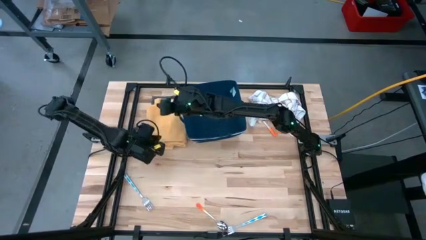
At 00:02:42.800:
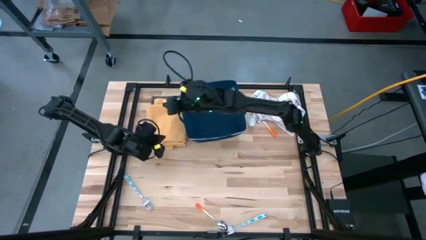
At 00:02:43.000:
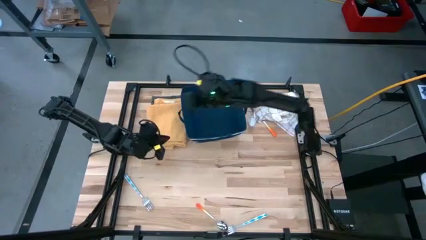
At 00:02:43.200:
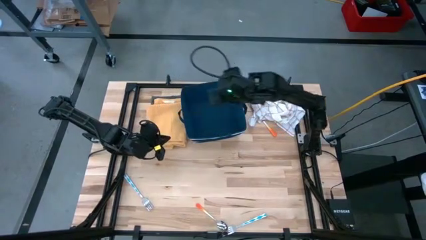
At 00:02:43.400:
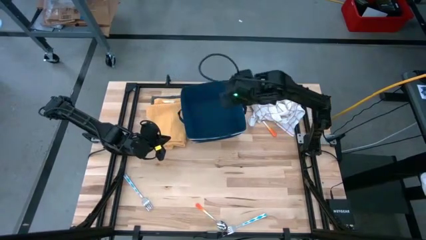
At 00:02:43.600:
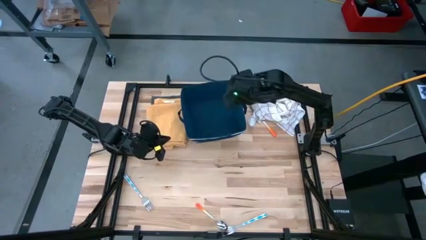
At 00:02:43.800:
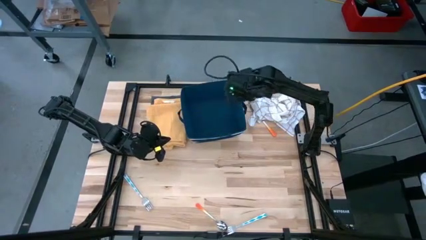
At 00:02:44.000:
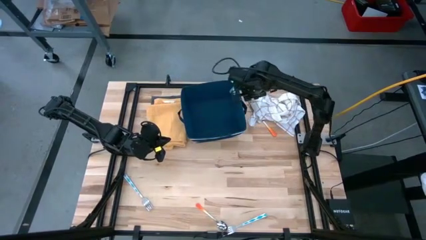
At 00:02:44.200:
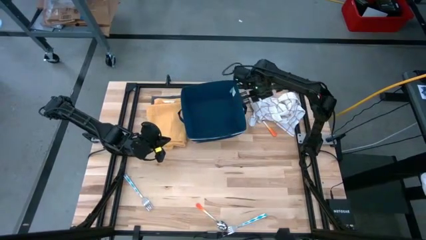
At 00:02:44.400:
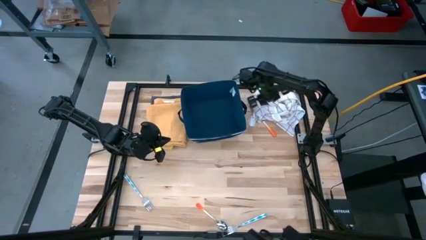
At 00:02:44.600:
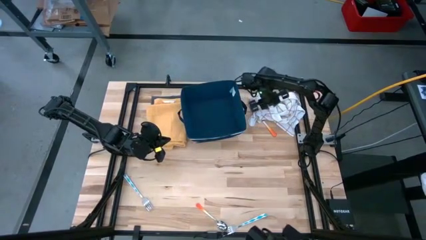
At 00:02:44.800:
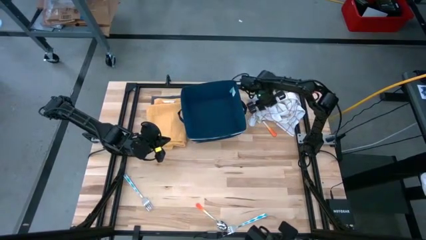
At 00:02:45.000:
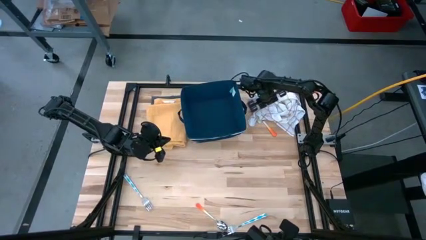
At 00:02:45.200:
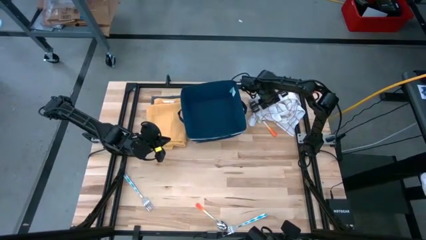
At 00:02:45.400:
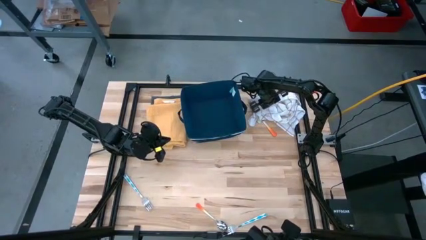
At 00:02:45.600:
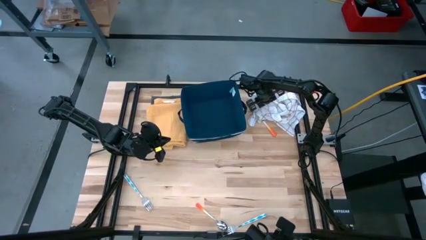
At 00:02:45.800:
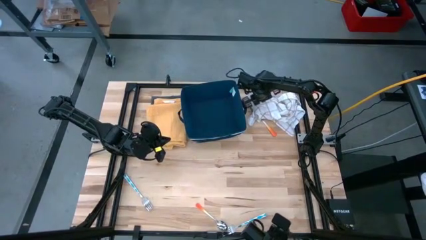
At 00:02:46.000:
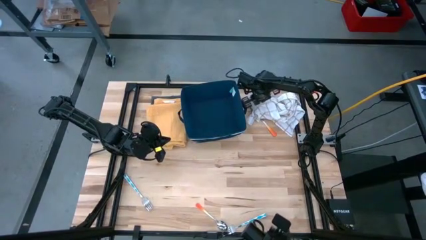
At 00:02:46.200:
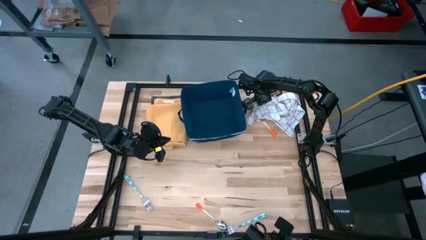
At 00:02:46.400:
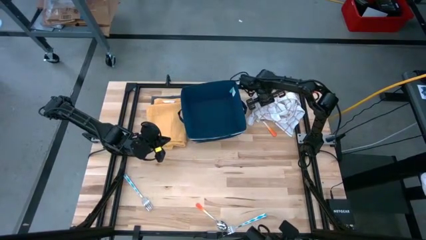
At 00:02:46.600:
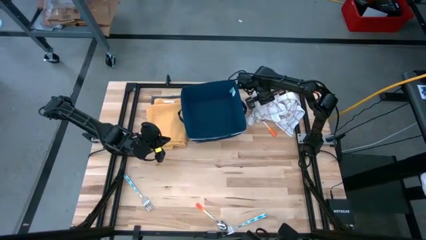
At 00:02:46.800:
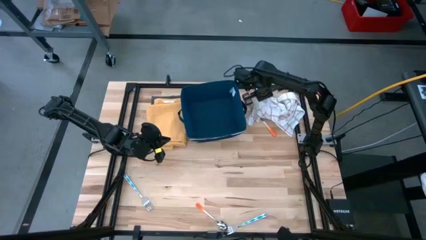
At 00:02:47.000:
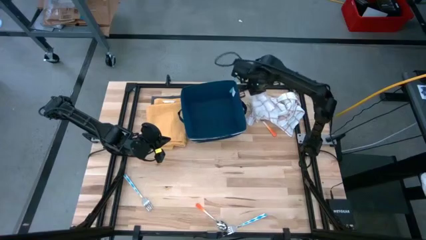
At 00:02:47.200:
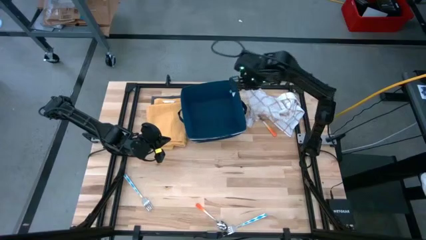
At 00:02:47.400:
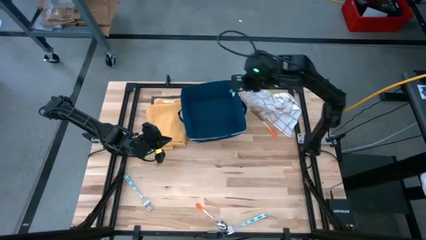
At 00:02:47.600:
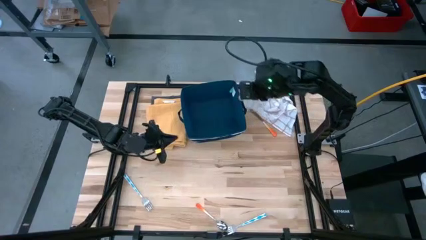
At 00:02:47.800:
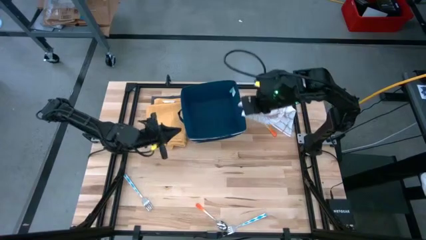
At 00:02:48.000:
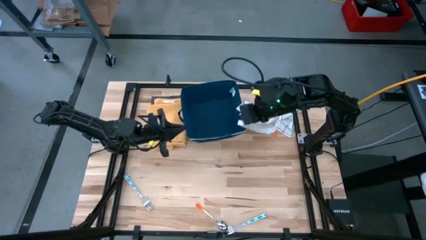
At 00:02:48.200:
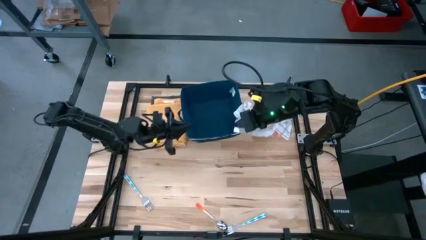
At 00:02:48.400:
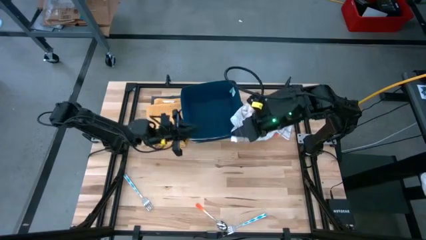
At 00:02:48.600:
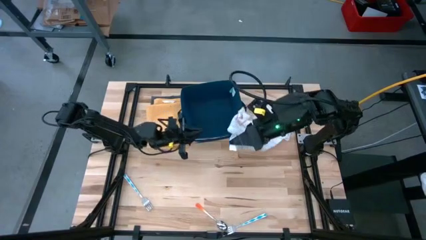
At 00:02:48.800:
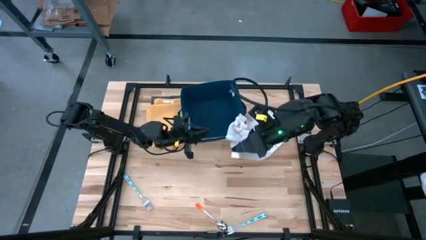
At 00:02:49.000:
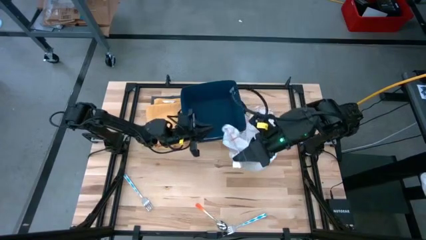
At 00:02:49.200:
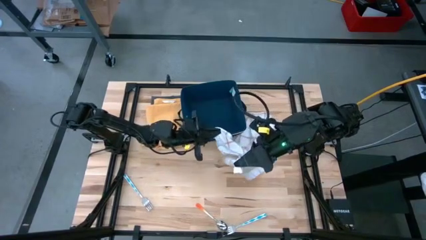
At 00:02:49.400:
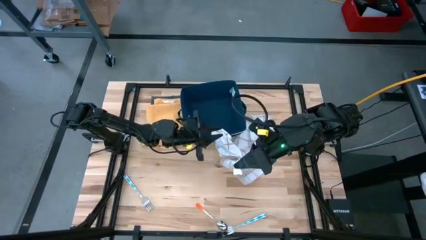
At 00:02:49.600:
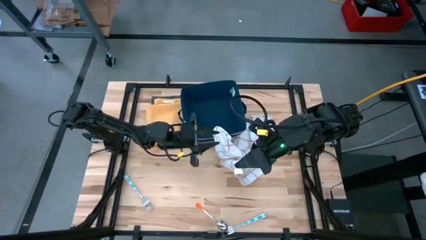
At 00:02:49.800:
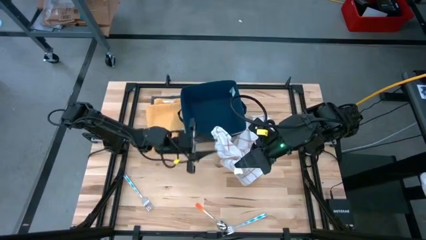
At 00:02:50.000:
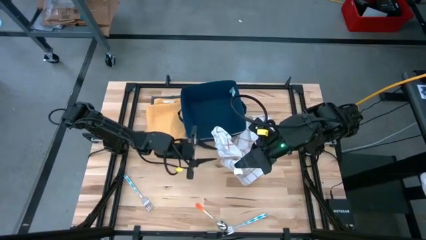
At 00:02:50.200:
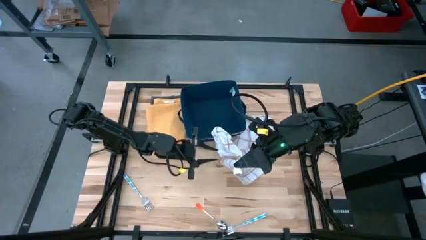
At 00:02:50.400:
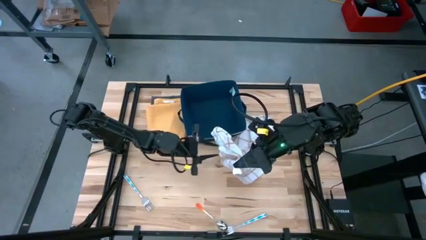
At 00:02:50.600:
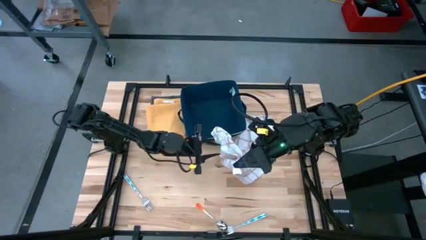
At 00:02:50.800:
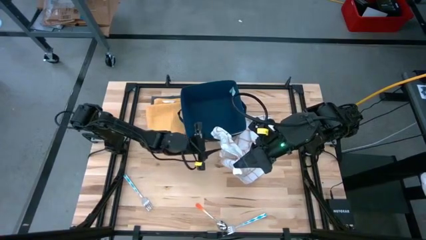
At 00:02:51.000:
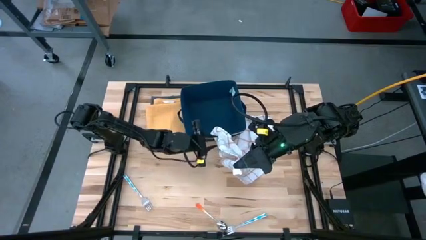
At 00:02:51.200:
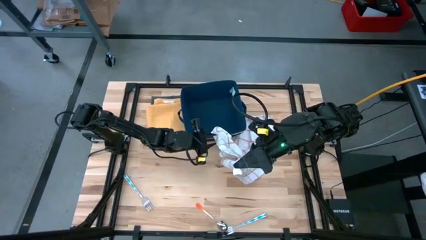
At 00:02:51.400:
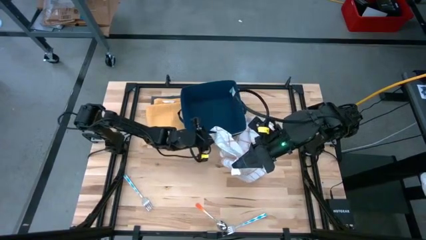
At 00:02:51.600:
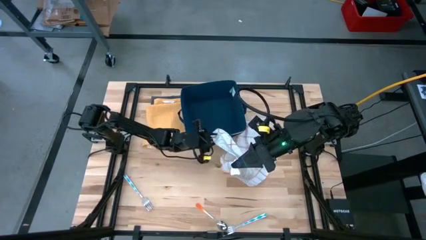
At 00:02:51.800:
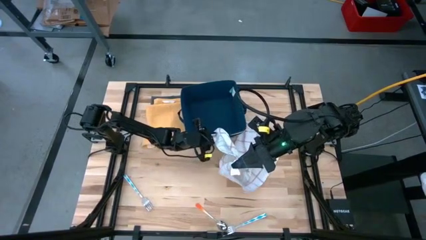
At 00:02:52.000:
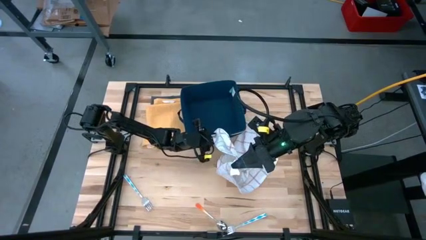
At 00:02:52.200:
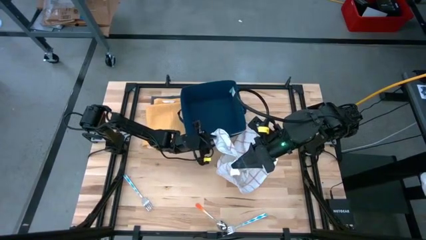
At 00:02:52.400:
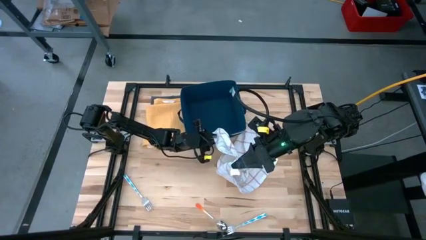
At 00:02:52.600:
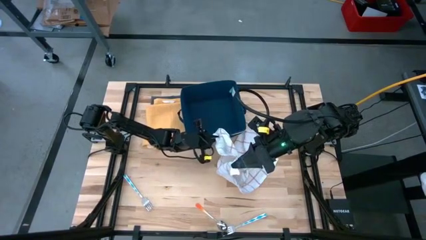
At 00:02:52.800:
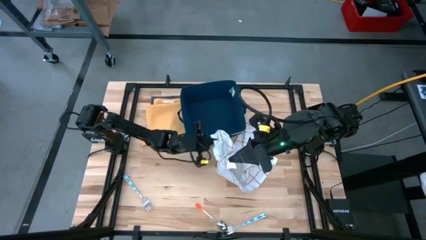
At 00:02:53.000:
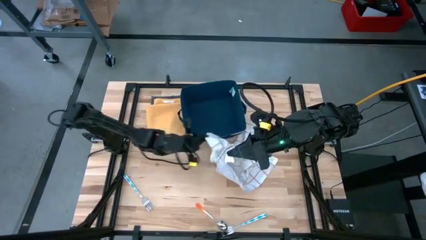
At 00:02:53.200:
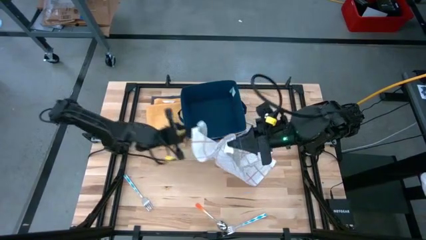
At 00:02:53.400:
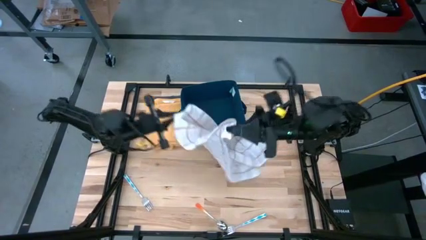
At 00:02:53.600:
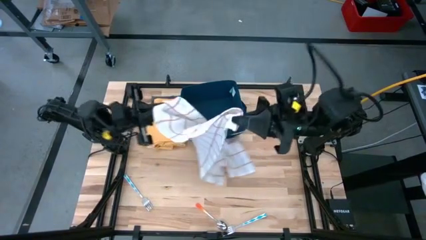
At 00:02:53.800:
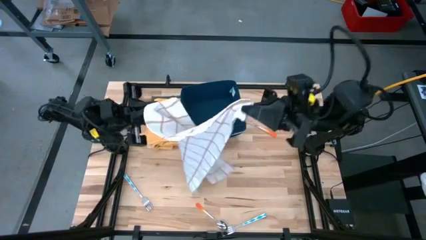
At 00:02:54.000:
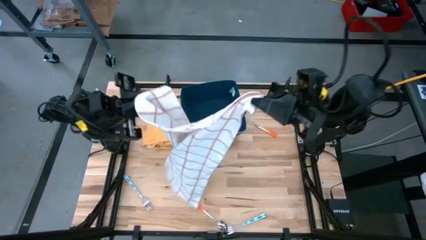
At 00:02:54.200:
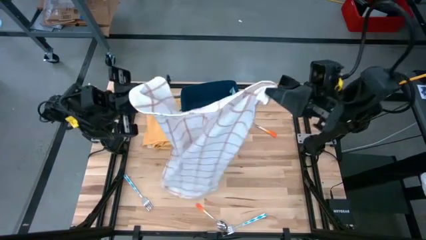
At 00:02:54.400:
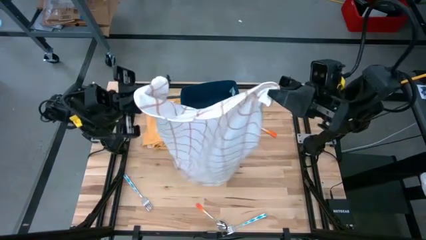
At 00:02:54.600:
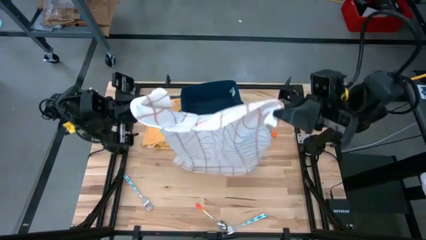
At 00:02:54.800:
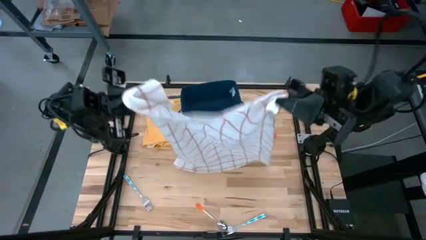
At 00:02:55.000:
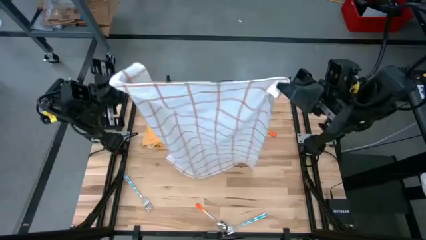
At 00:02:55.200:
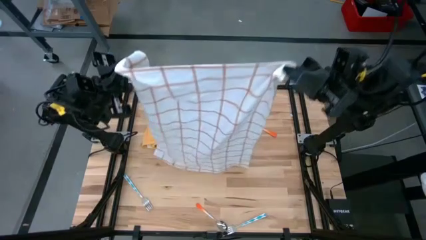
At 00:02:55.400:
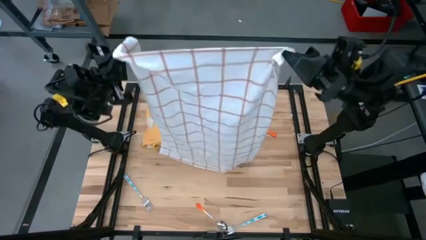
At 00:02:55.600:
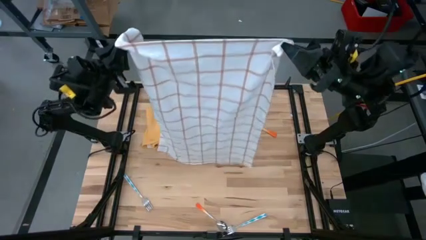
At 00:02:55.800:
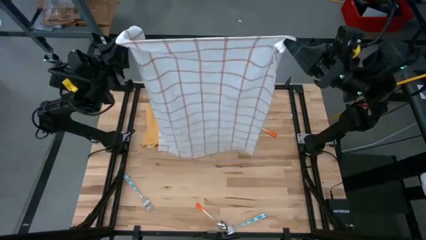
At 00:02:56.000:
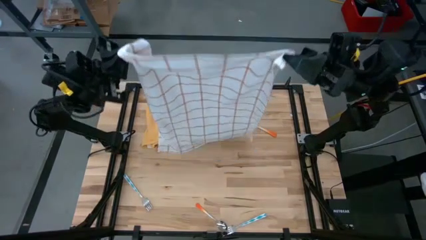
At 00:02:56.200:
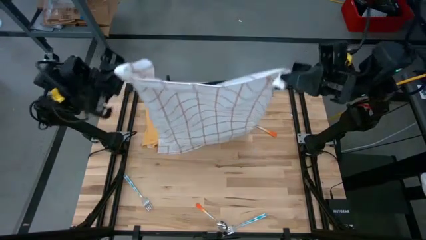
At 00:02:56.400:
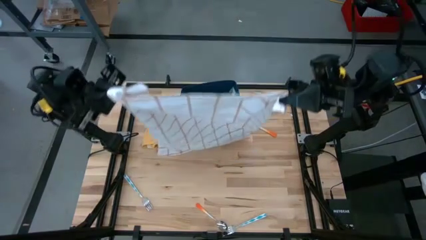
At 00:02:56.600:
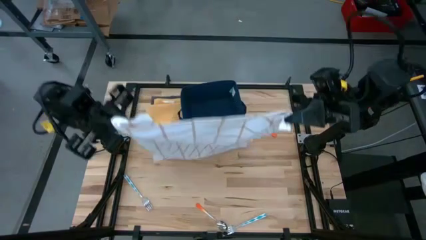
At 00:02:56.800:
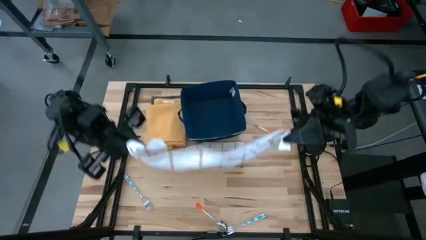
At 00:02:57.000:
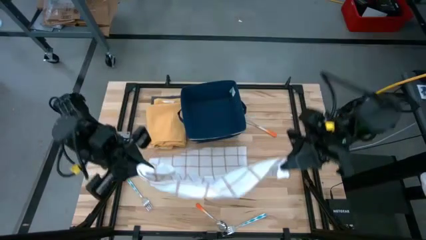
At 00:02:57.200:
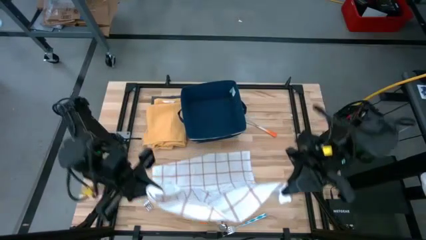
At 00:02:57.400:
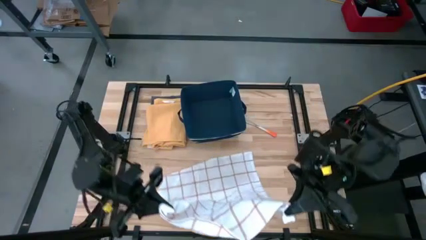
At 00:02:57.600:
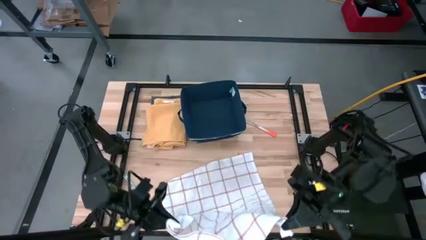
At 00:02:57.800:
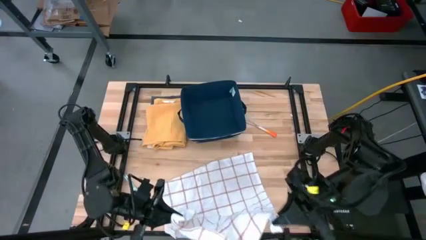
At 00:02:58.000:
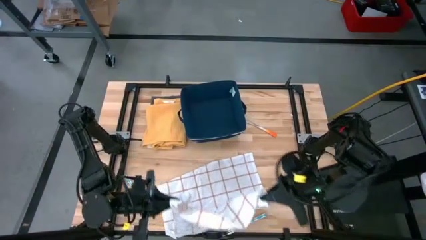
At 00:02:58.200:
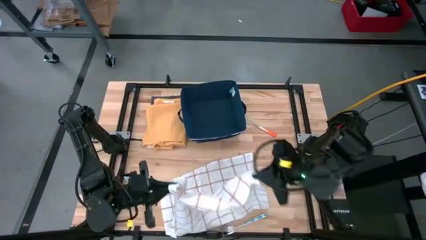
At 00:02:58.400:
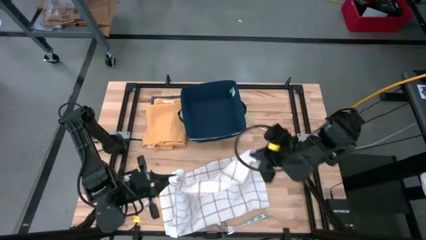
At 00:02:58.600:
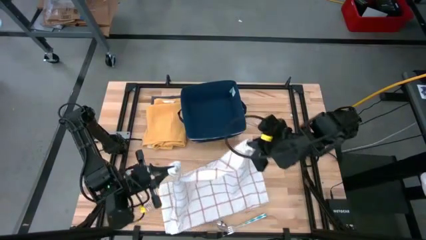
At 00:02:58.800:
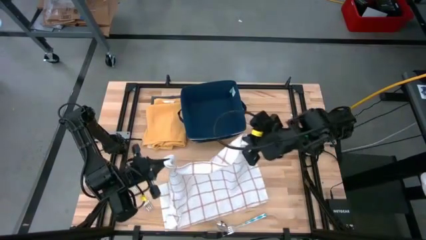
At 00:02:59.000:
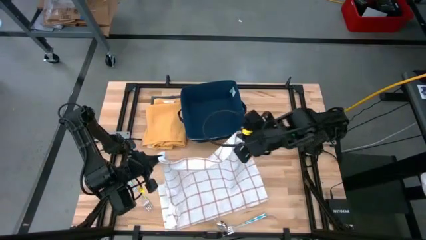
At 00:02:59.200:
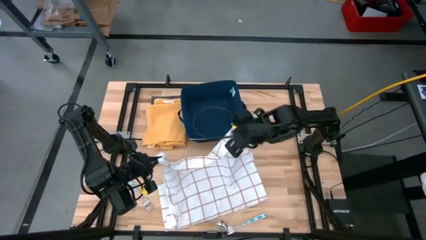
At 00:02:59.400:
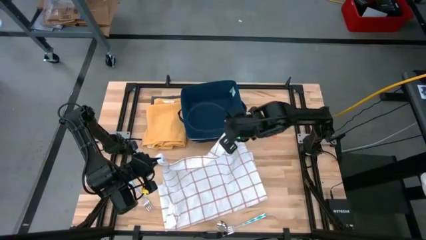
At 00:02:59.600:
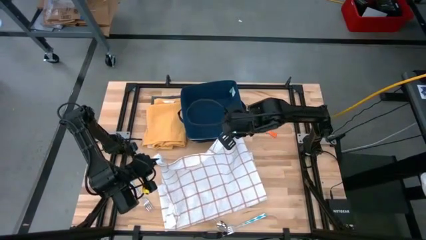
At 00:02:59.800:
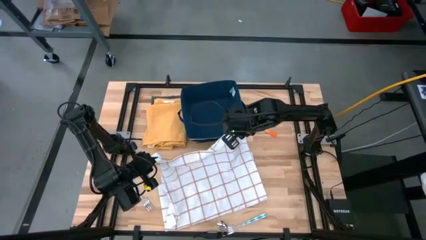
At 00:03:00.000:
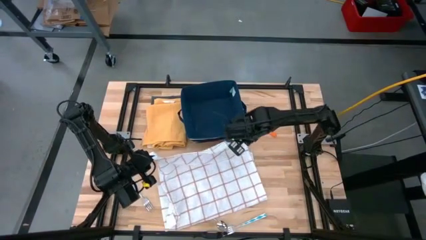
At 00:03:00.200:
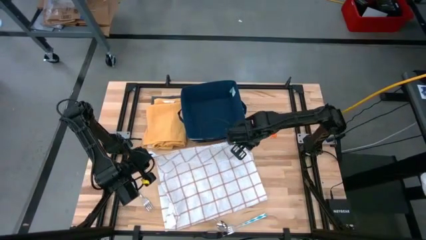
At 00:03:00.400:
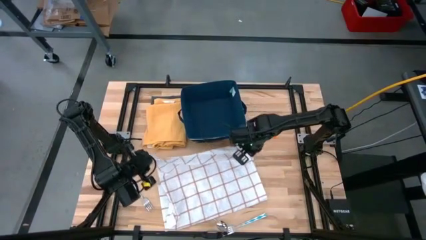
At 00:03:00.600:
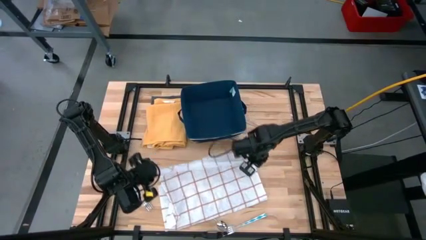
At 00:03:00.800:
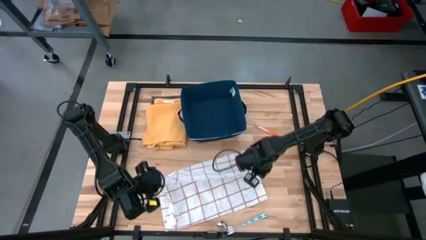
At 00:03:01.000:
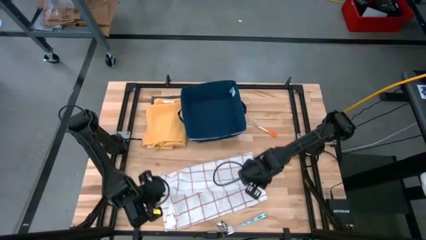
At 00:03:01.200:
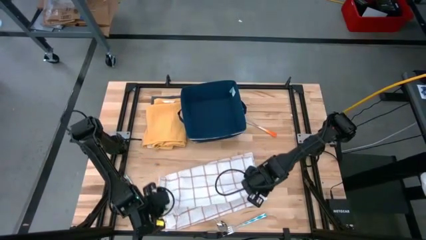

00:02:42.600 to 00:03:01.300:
Task: Fold towel
Fold the white pattern towel
